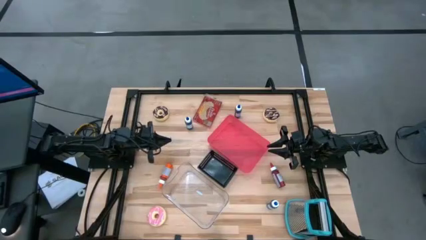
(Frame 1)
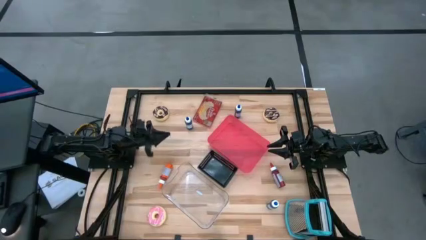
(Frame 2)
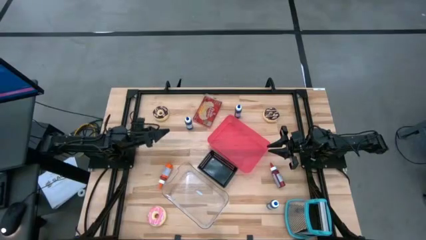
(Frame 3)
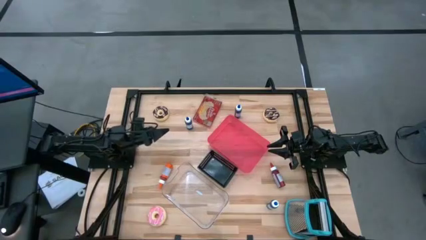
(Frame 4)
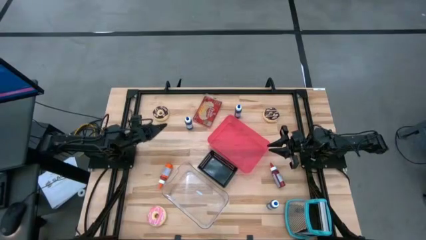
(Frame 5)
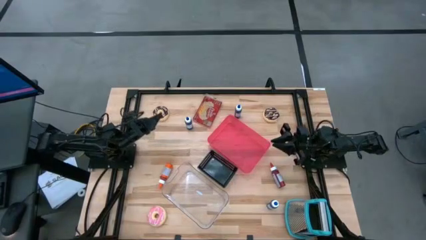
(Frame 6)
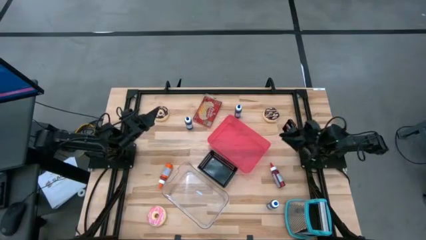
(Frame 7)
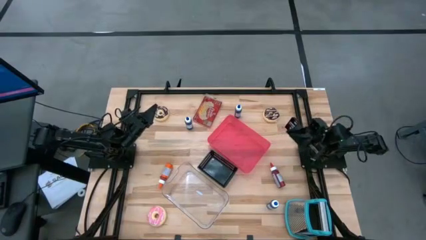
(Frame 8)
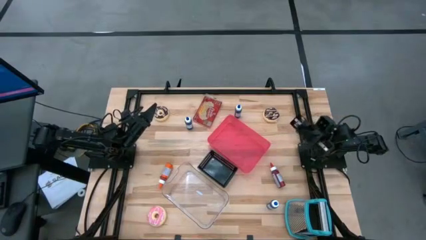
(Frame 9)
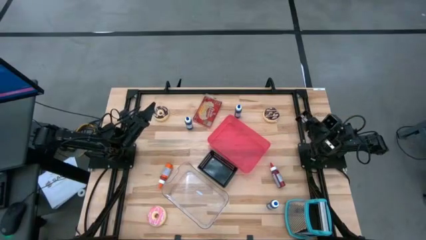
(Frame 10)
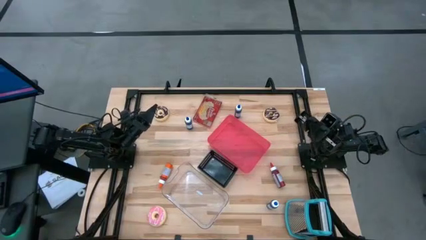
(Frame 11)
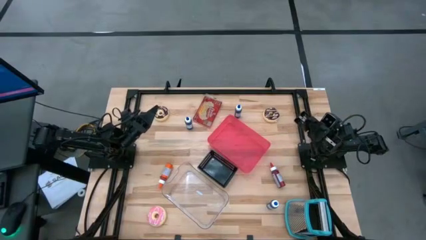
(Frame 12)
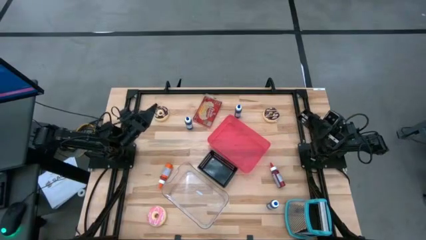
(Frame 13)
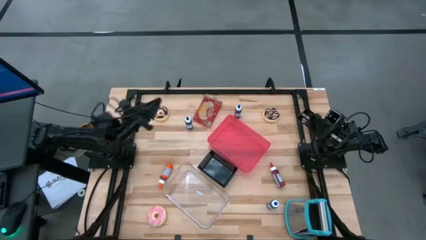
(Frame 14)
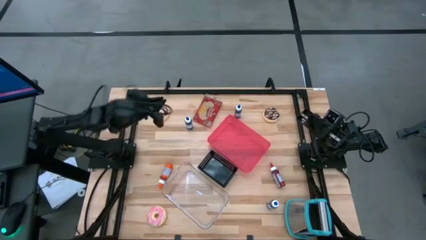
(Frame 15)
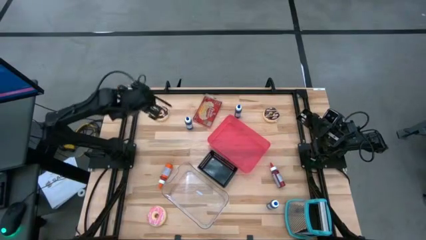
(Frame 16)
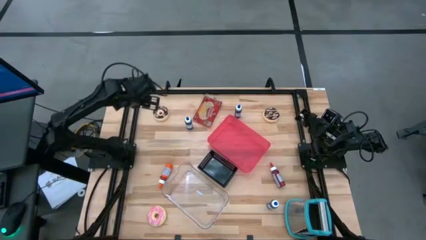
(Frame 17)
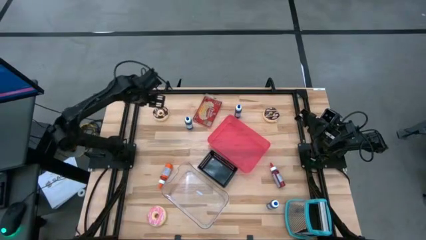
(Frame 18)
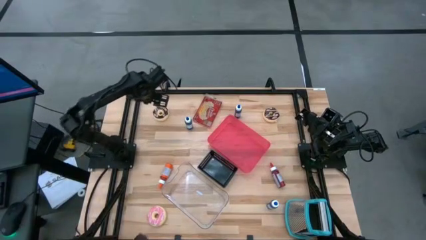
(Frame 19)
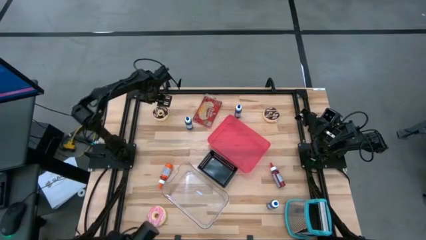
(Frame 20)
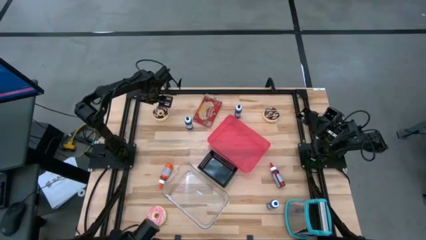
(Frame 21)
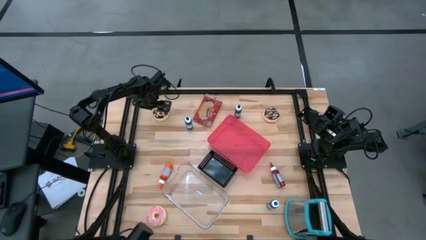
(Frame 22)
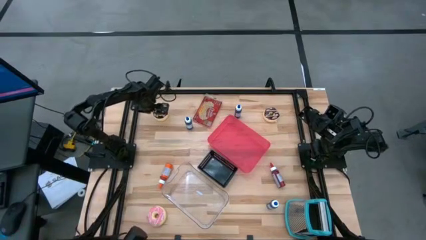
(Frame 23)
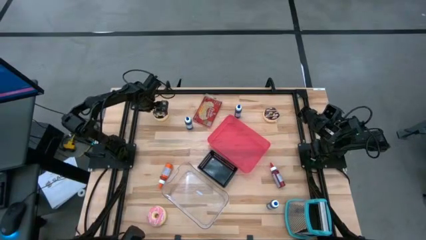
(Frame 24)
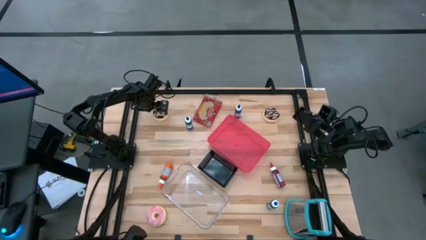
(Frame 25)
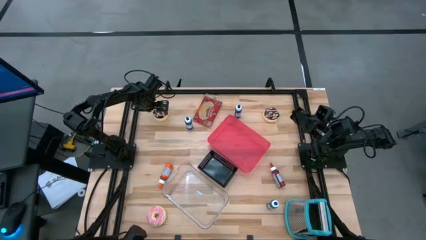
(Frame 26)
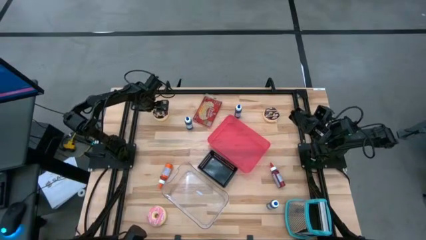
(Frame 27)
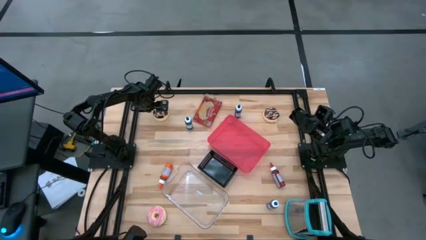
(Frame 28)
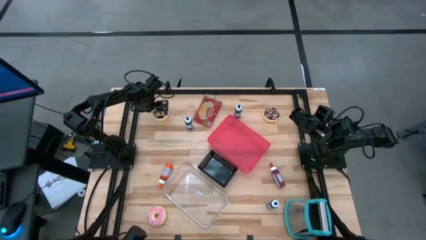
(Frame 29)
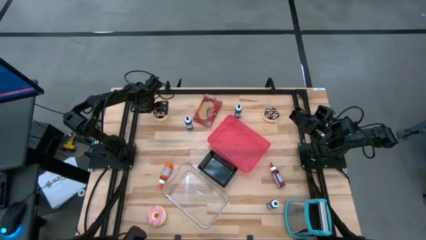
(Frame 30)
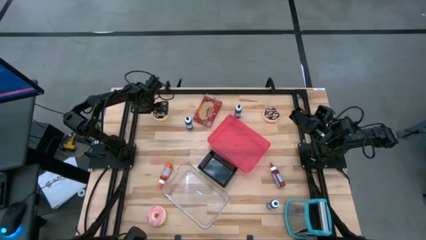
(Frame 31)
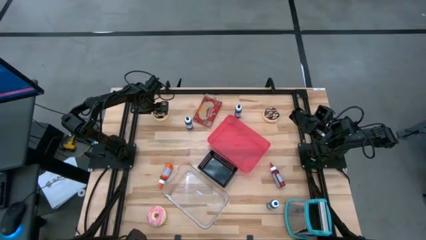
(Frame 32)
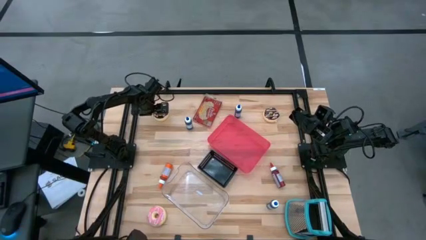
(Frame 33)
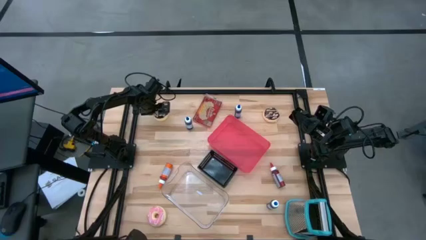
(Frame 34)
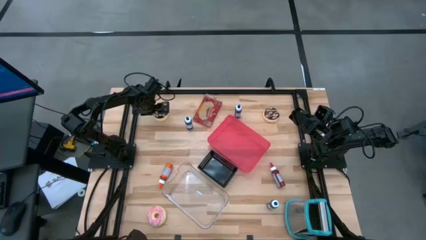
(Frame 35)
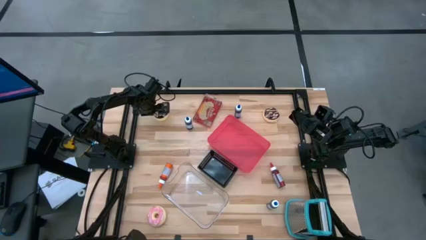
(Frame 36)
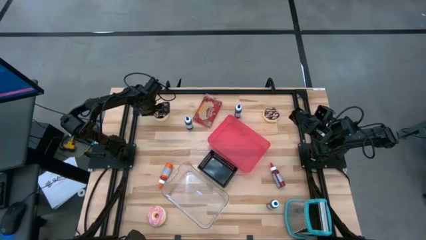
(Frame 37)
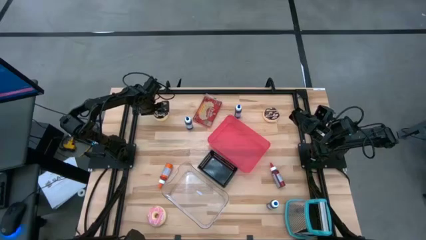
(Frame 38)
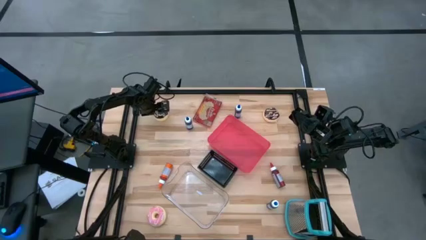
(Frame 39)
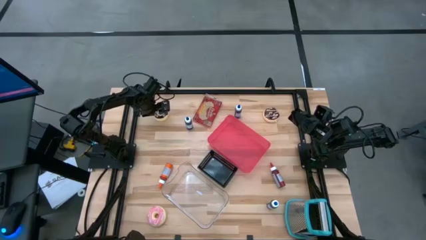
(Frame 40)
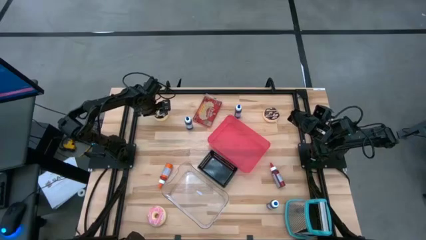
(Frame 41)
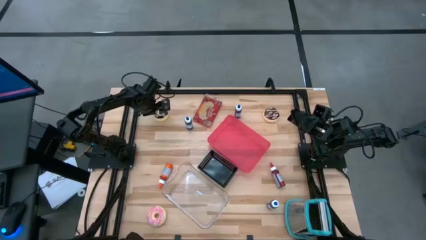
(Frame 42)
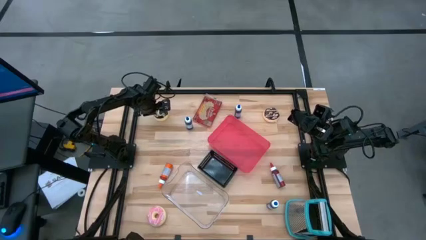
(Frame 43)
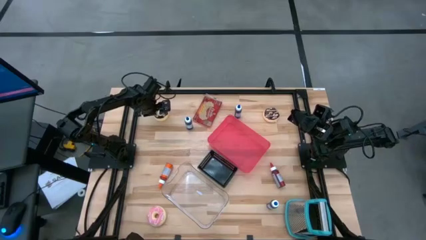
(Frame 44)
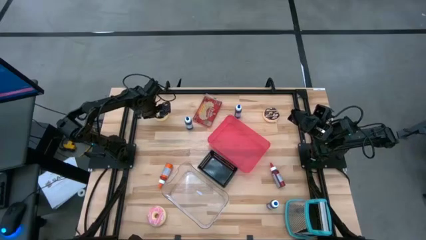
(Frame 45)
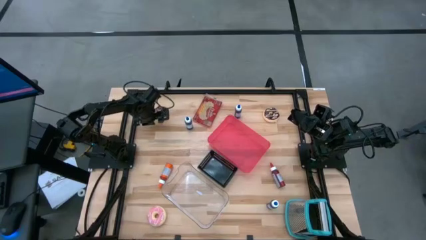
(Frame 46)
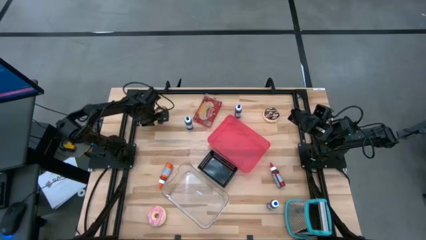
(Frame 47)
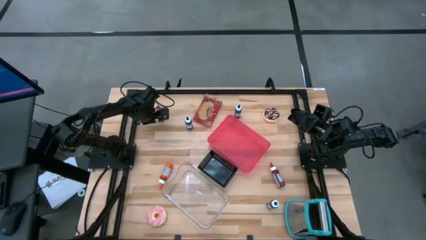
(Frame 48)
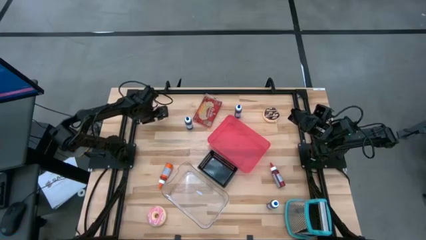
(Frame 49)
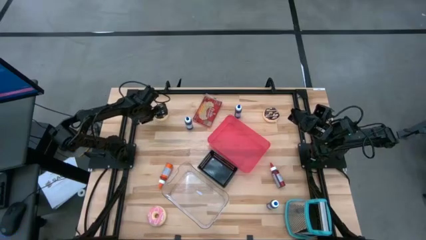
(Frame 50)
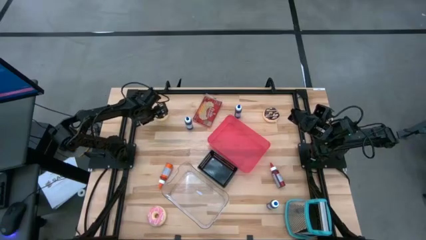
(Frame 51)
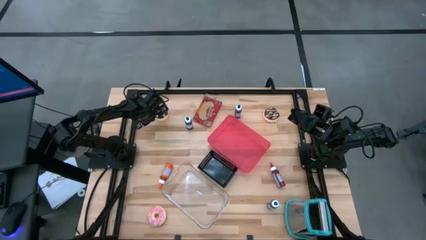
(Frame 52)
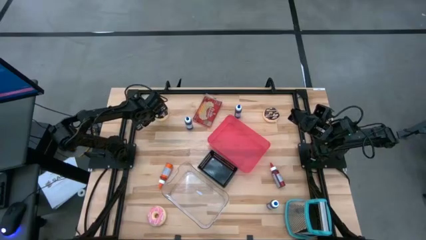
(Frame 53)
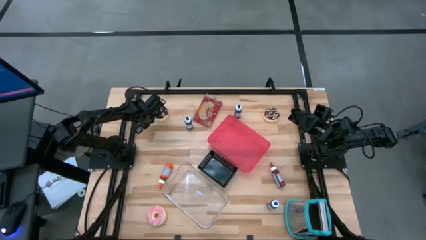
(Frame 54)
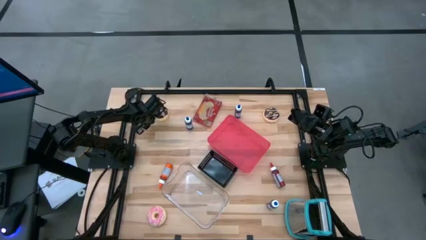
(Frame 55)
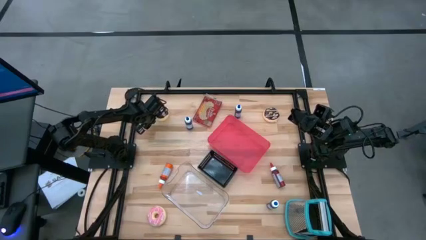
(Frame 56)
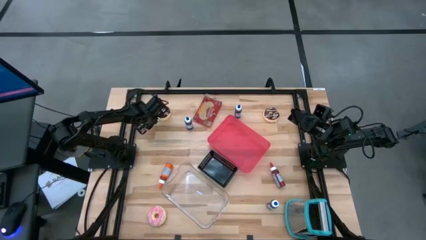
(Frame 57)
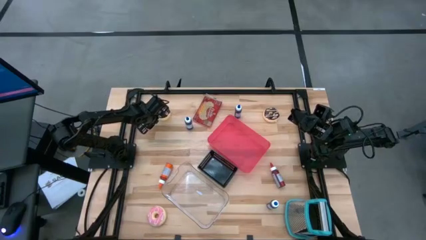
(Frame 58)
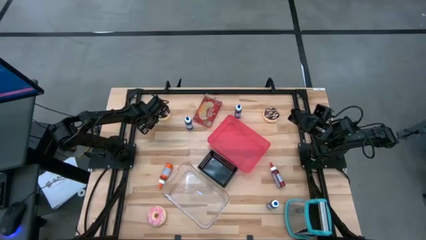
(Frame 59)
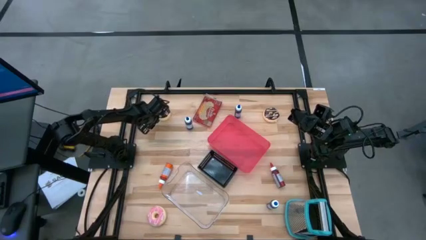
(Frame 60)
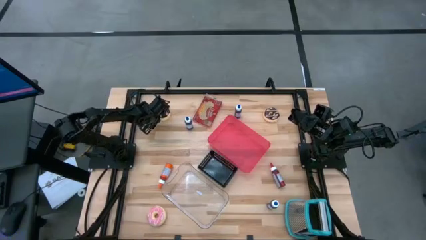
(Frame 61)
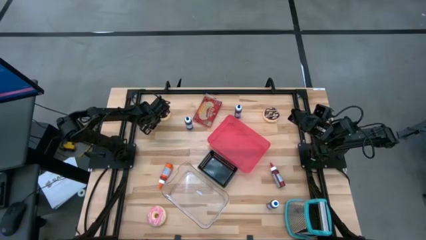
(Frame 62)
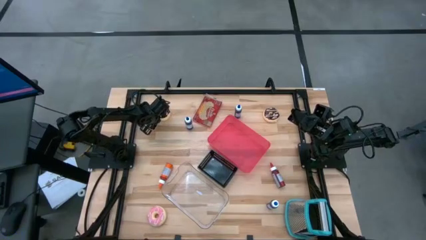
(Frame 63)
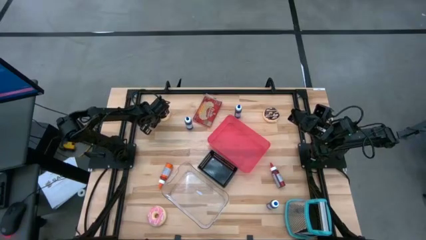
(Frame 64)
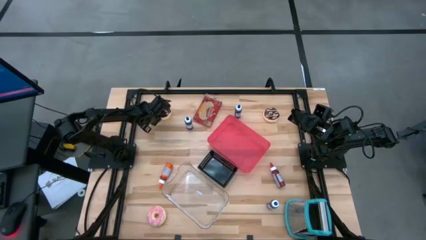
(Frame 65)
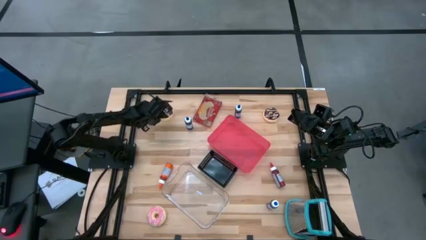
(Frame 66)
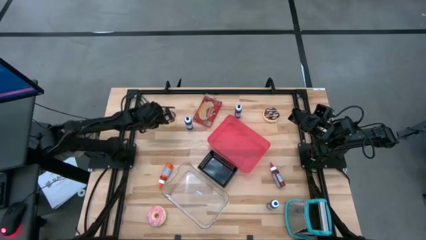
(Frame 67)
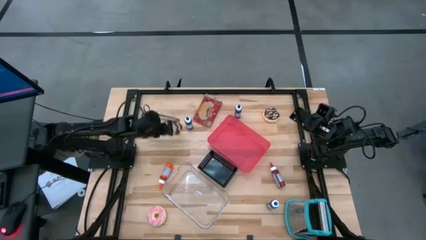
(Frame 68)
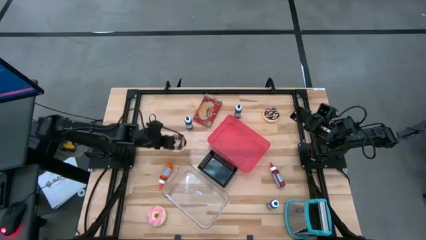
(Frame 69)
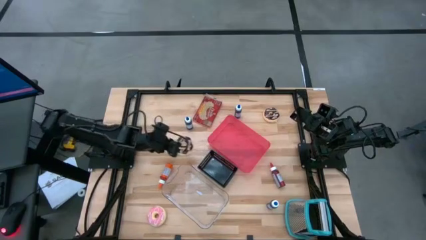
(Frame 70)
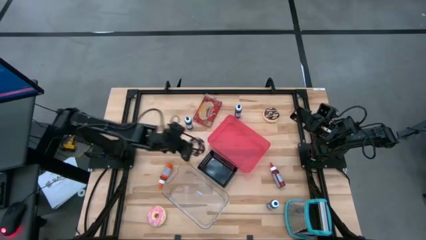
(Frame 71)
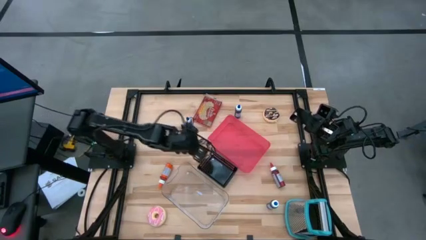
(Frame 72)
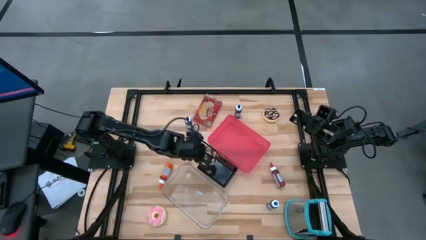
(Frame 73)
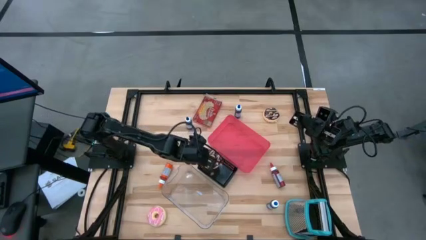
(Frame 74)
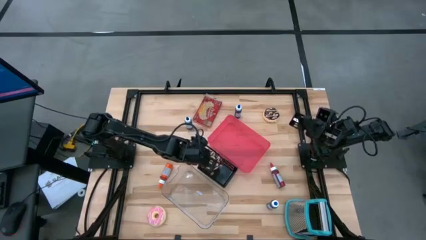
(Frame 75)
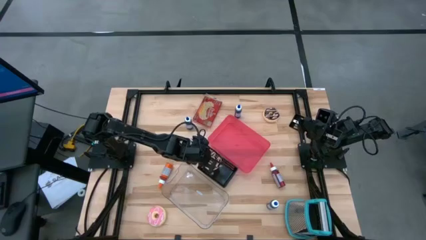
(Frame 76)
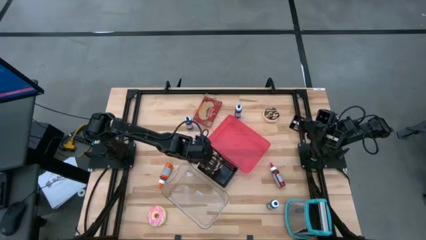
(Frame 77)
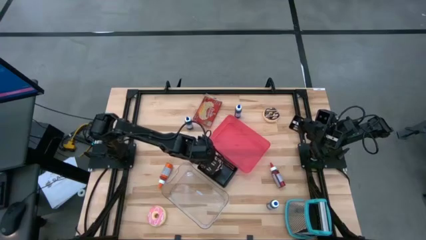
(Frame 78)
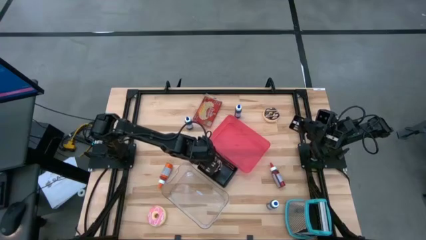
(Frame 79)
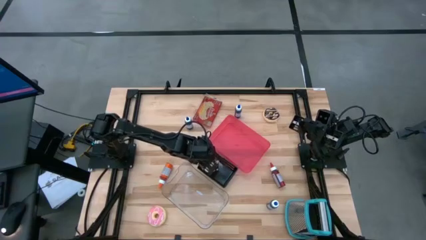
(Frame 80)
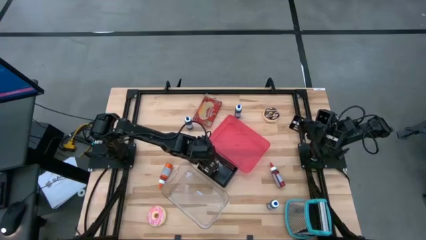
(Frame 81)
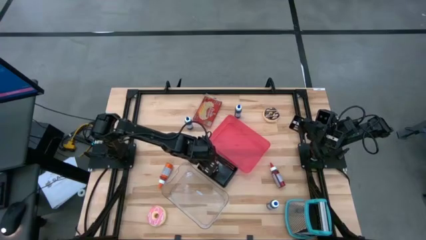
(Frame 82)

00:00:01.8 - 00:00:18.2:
Put the left black donut into the black bin
